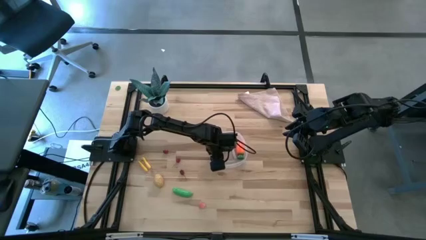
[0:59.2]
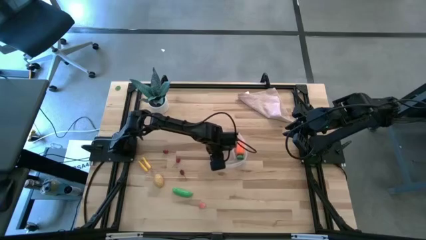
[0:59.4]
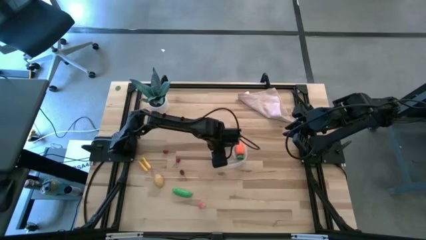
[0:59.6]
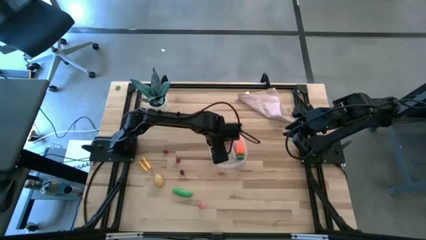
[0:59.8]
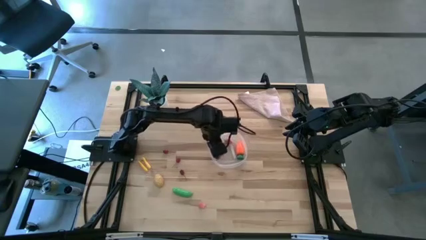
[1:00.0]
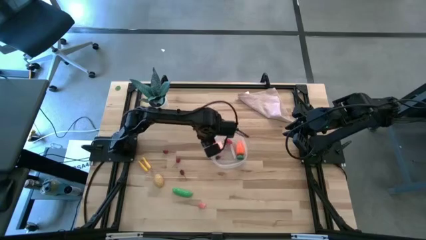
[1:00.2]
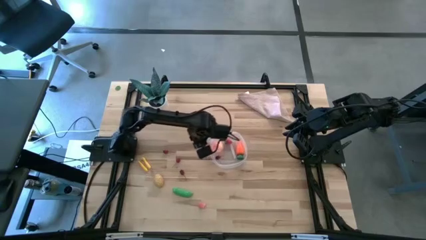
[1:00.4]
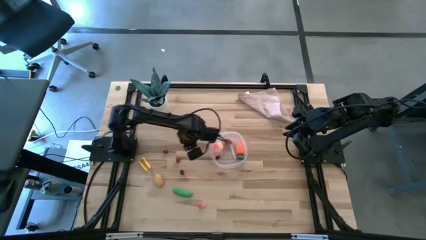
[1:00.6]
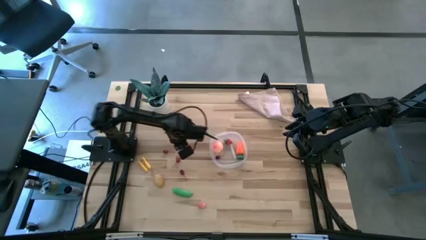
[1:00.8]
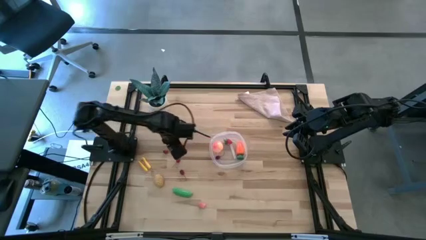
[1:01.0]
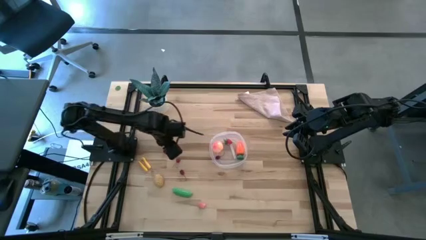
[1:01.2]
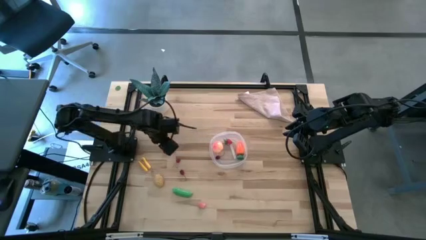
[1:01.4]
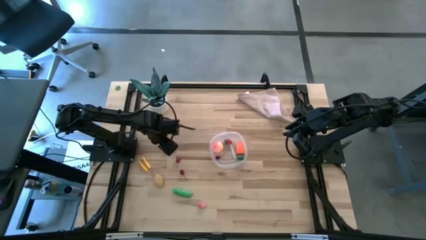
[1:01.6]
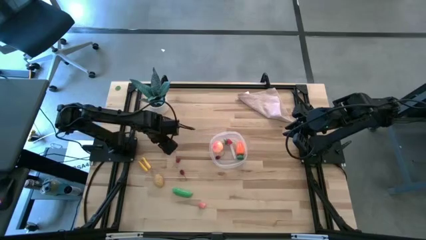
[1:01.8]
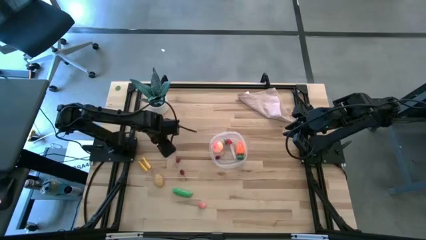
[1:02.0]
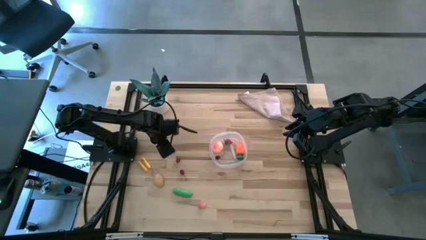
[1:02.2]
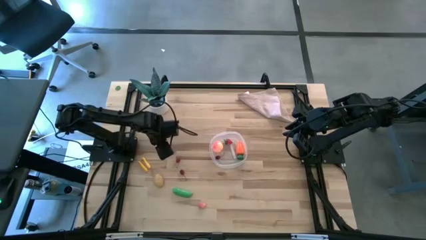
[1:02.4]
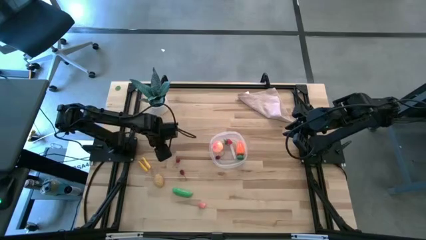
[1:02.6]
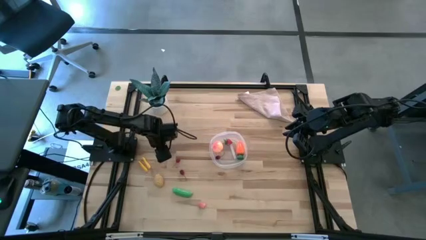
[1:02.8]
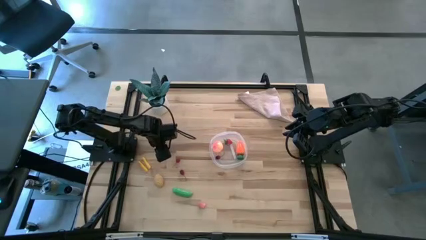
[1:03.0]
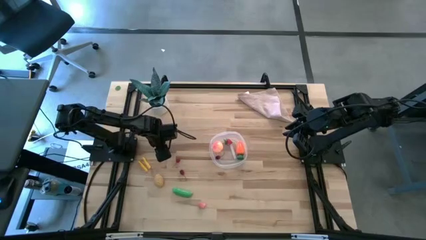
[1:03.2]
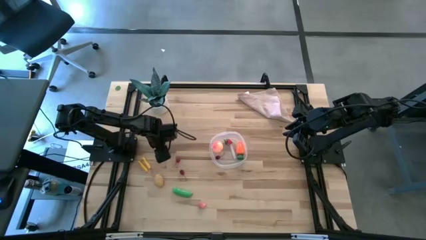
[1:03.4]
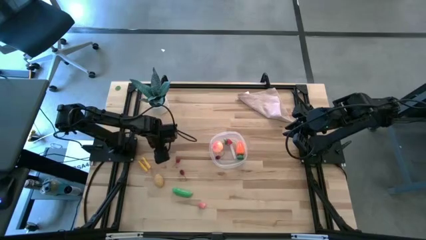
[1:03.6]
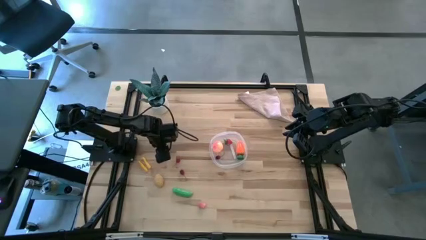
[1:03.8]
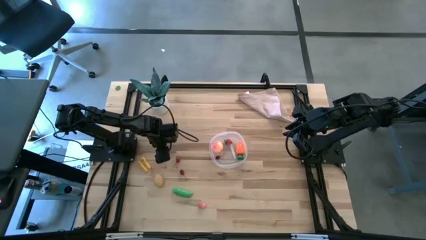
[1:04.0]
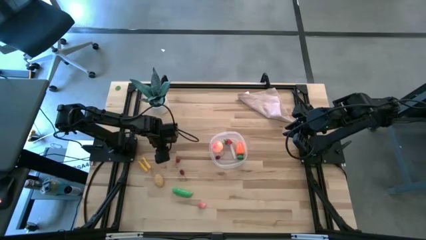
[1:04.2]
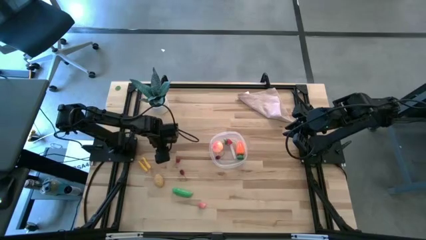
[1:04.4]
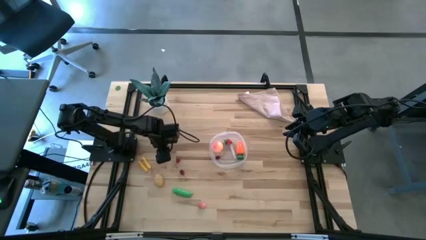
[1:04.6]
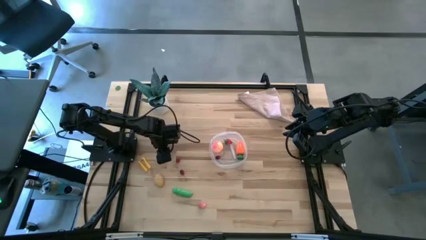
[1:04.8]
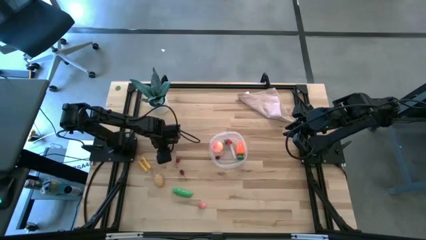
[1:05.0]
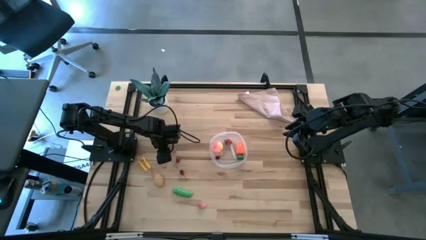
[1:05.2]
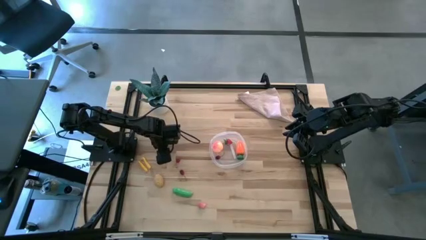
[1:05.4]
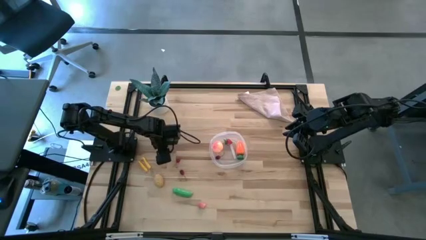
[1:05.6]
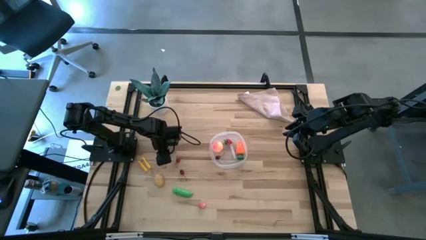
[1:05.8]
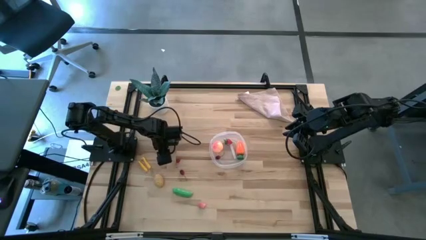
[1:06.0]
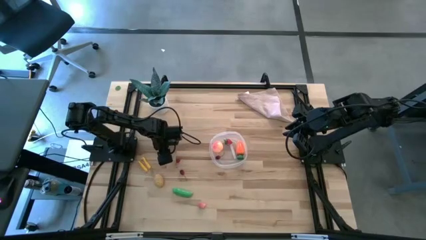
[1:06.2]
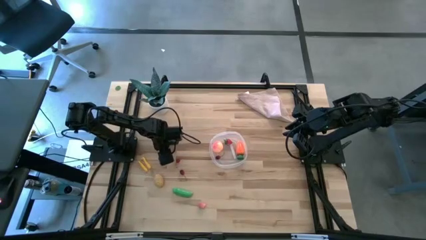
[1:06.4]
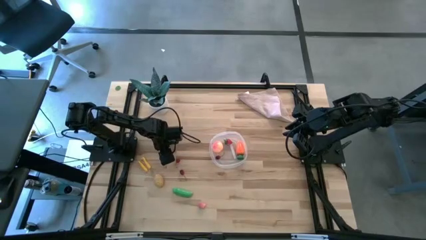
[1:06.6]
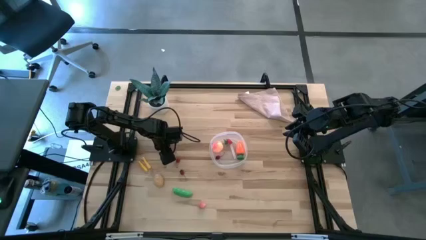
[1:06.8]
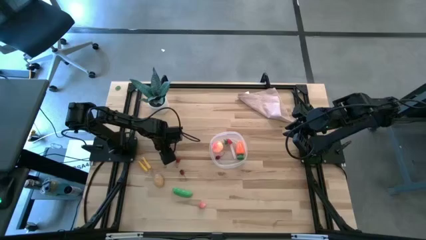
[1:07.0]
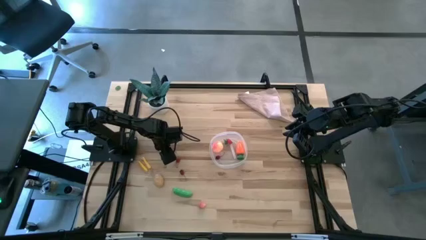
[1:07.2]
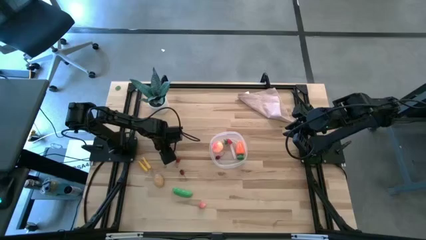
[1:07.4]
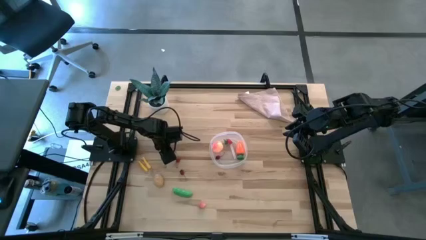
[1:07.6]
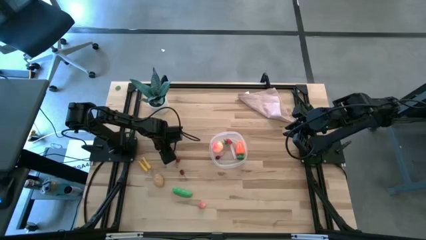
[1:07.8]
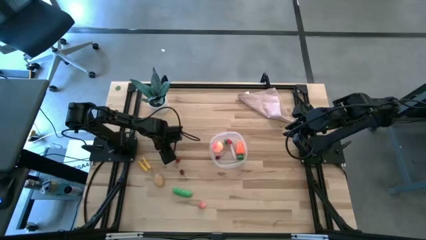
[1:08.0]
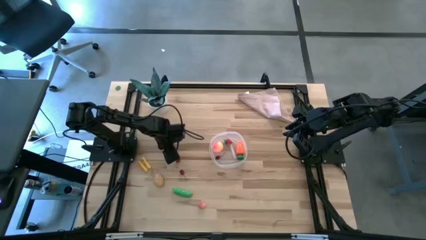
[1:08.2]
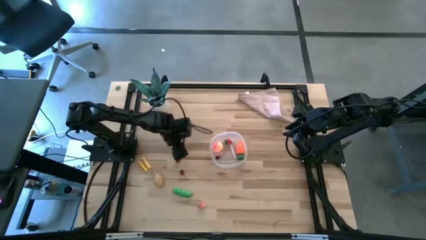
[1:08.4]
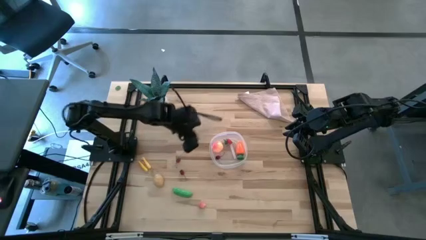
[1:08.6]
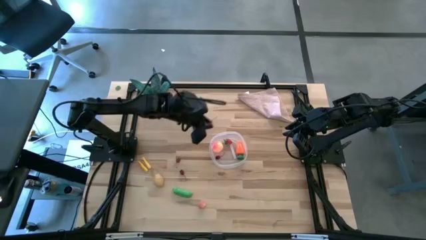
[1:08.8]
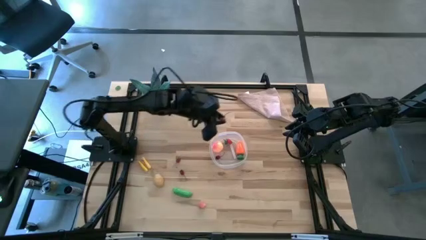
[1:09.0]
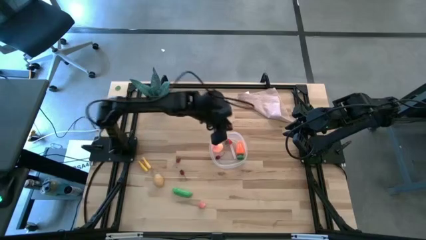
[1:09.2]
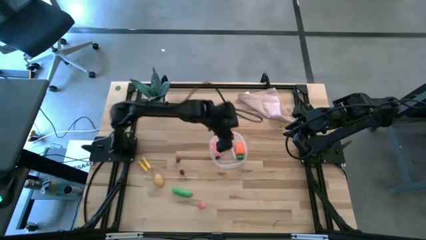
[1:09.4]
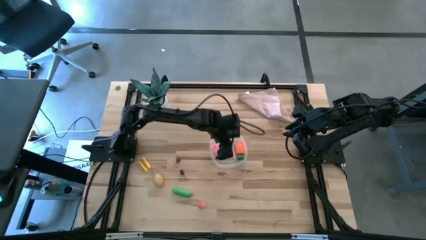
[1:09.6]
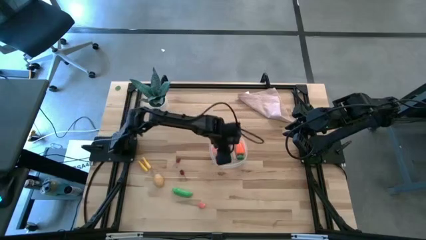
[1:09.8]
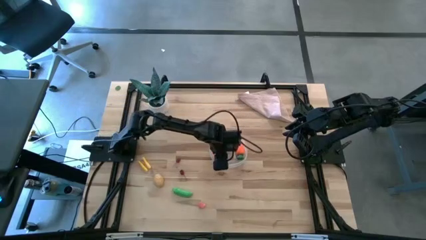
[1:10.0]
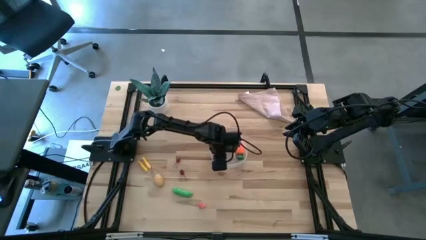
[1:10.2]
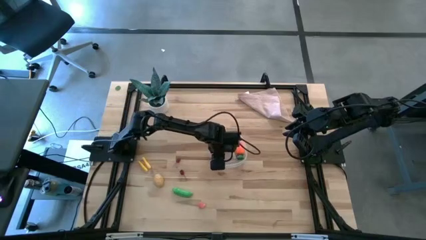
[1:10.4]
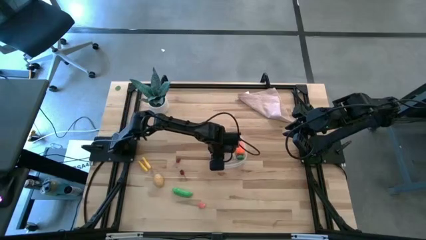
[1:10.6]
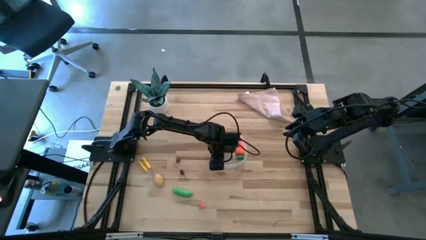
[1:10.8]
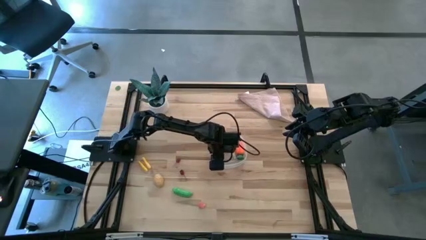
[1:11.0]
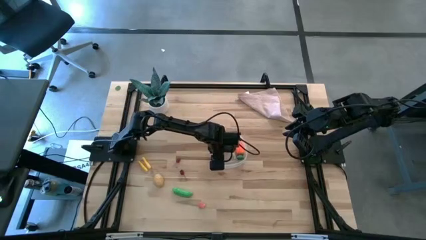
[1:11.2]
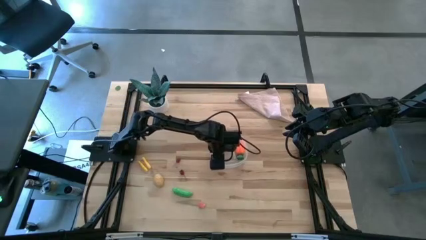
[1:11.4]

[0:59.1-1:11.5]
Task: Pick and placing Produce into tupperware
Put the red cherry into the transparent bin

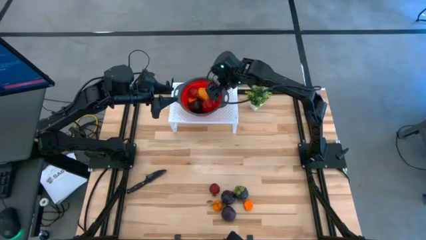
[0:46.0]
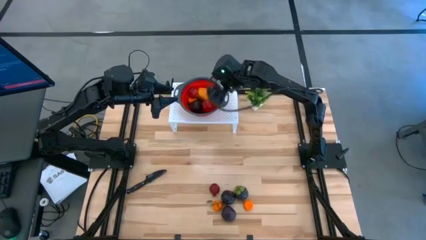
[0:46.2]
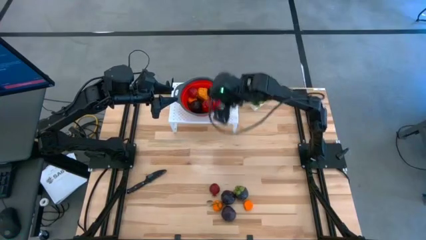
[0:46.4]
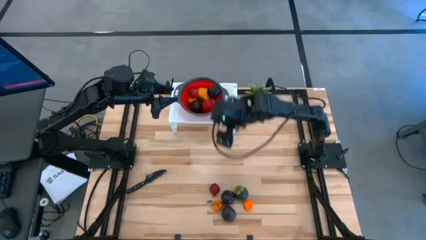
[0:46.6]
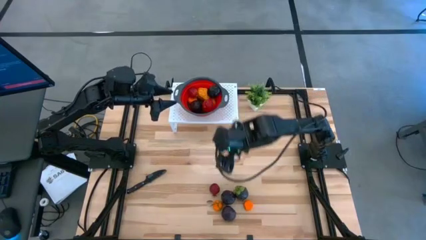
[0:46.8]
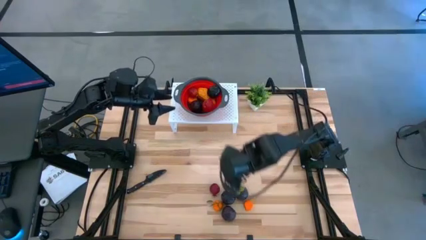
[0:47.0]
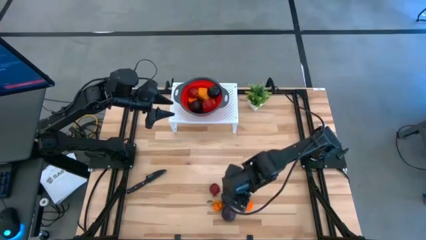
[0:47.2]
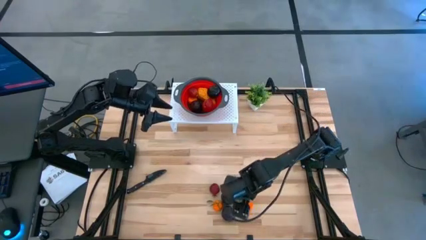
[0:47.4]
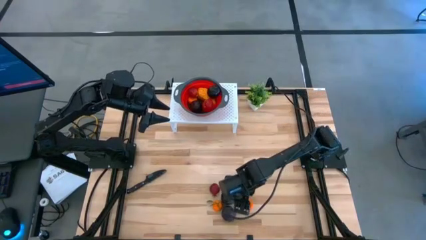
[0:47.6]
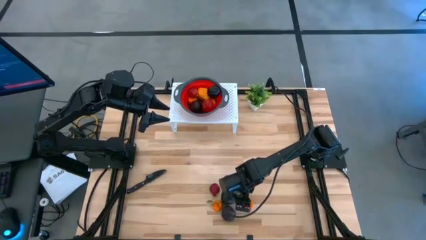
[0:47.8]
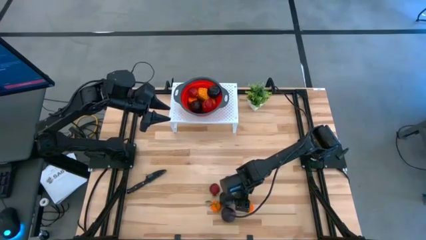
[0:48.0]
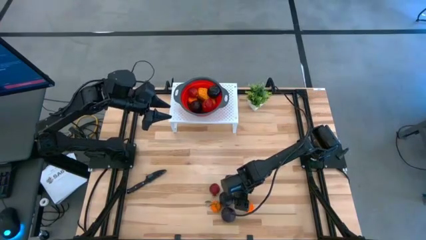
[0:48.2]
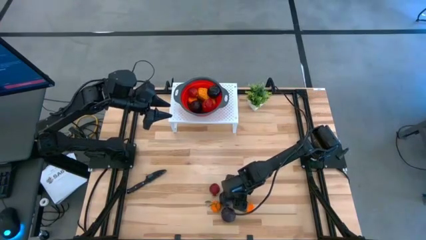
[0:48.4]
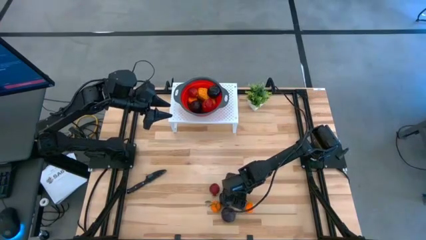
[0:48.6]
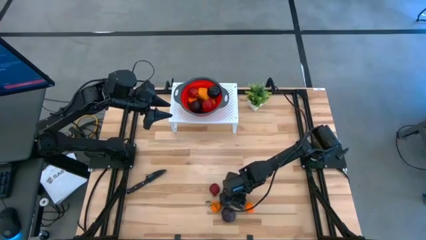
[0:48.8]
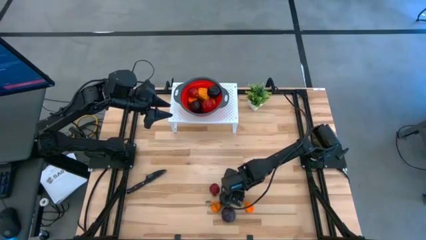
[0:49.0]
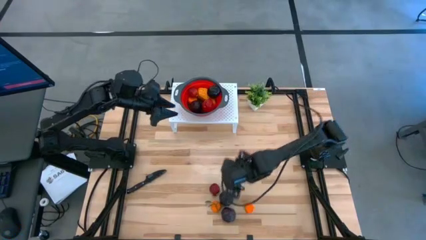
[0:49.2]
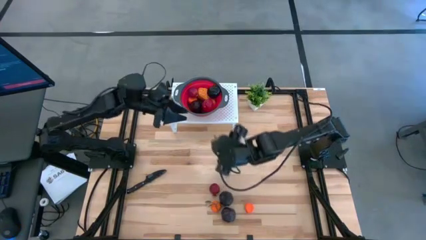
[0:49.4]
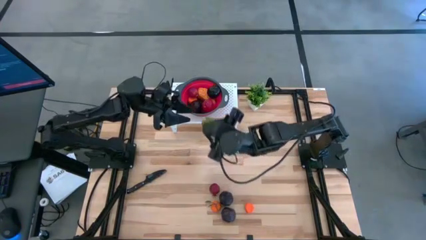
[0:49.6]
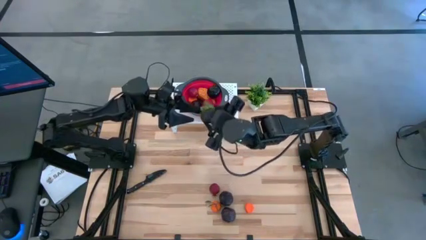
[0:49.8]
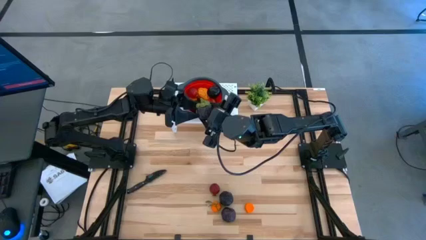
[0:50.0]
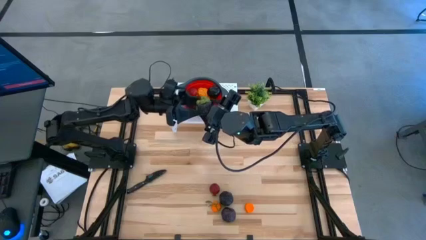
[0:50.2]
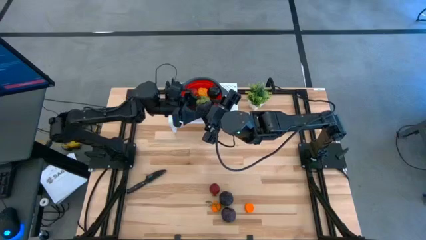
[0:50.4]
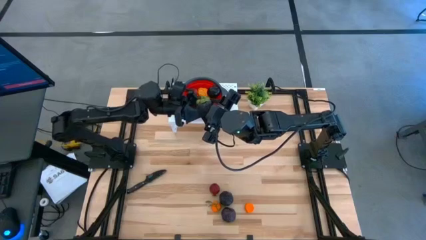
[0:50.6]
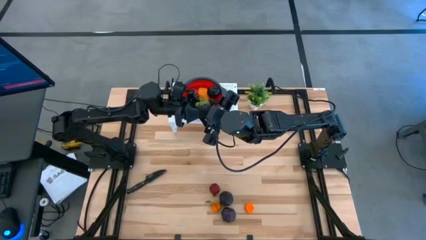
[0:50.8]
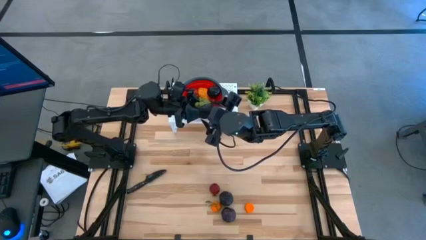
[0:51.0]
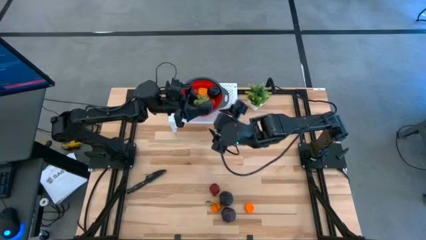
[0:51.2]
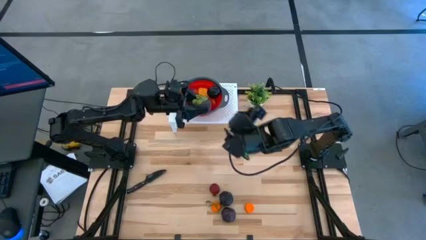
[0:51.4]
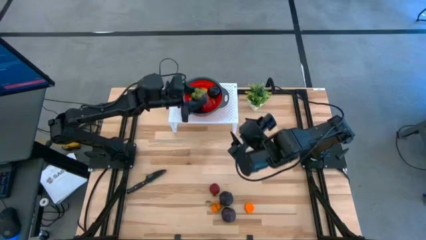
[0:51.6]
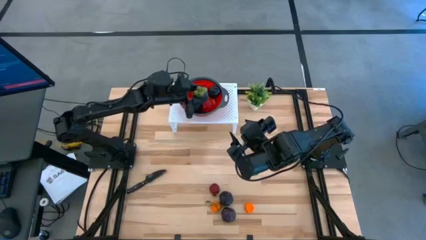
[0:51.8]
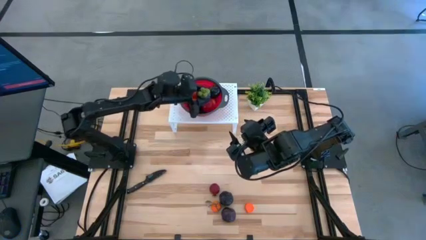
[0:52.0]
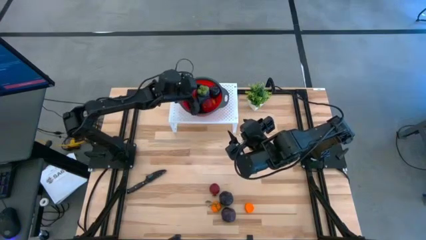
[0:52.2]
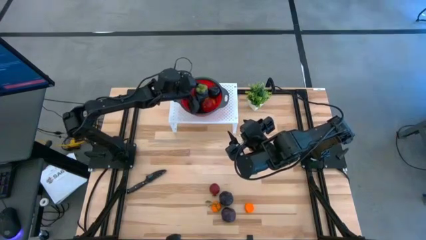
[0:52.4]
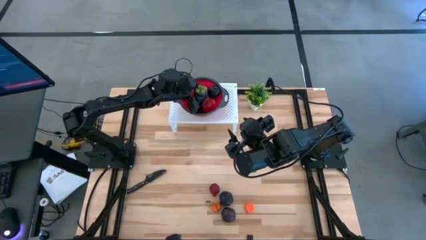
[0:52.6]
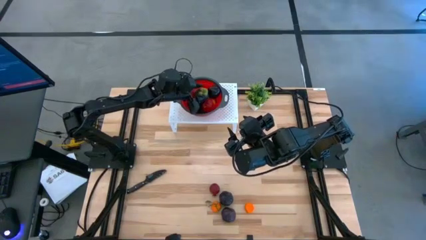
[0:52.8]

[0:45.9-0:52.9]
Task: Pick & Place Fruit
Put the purple mangosteen into the red strainer bowl on the shelf
